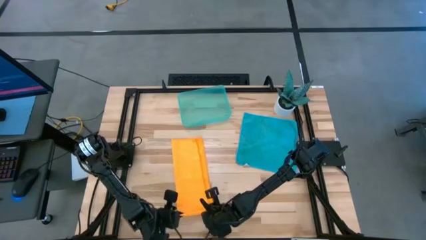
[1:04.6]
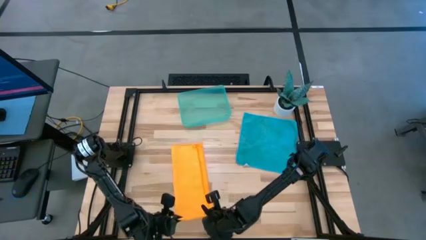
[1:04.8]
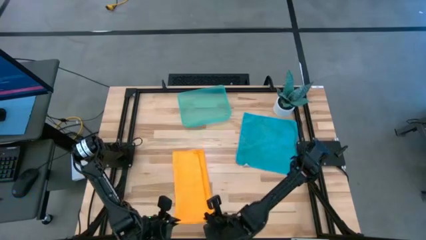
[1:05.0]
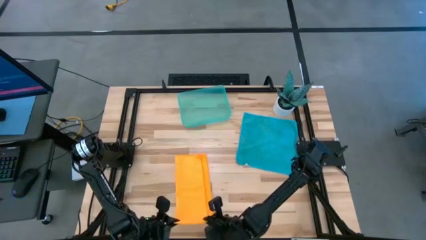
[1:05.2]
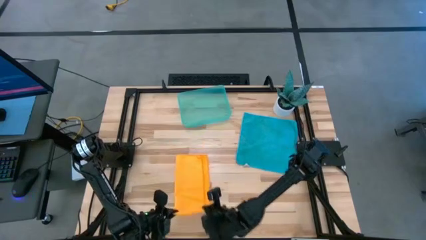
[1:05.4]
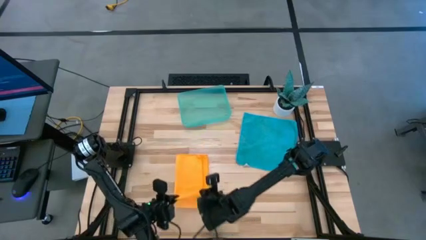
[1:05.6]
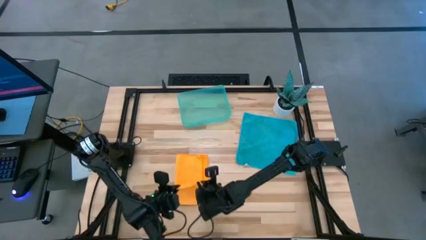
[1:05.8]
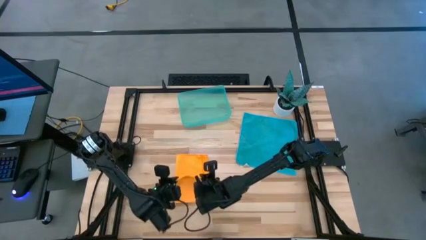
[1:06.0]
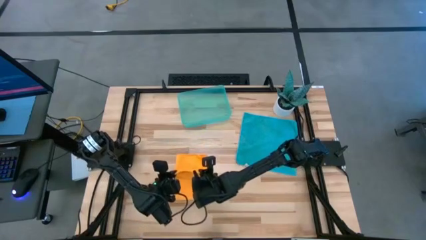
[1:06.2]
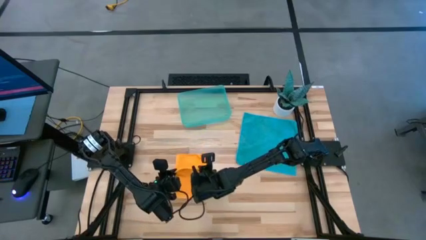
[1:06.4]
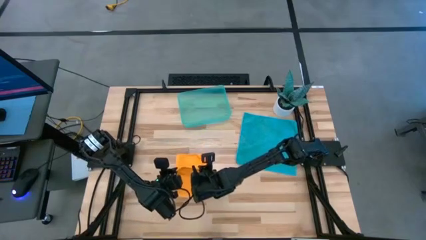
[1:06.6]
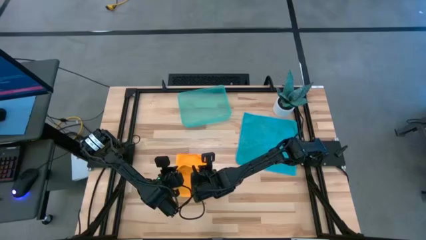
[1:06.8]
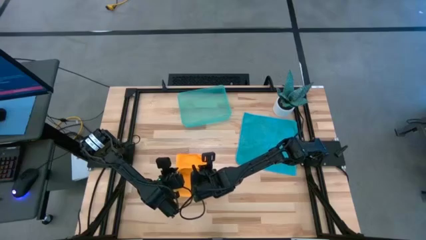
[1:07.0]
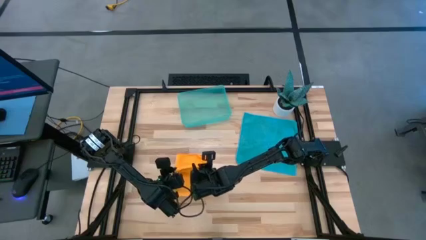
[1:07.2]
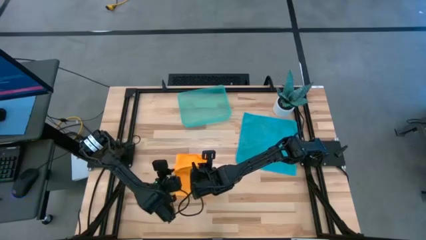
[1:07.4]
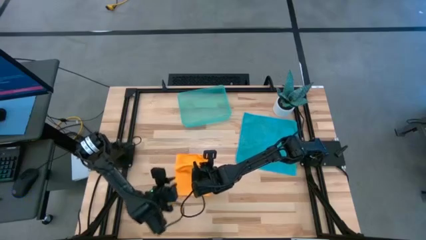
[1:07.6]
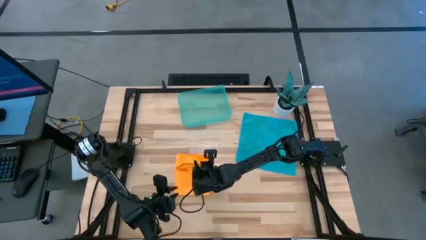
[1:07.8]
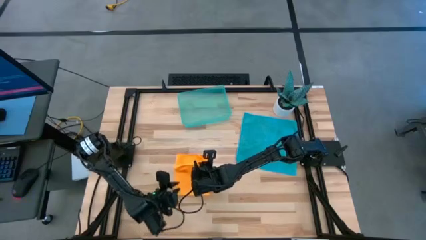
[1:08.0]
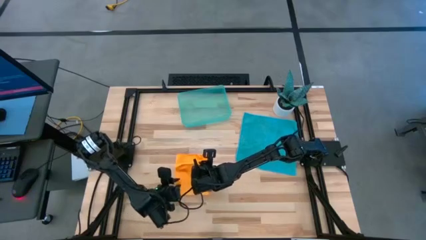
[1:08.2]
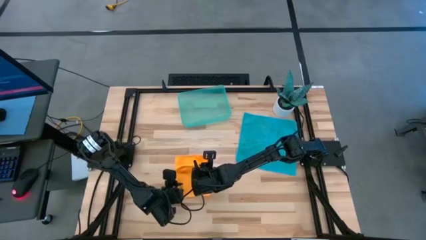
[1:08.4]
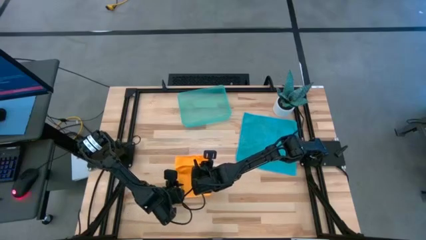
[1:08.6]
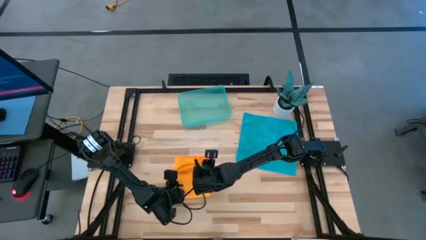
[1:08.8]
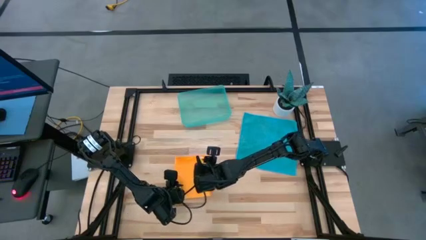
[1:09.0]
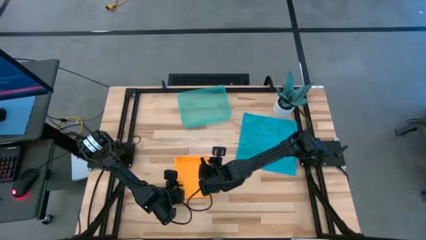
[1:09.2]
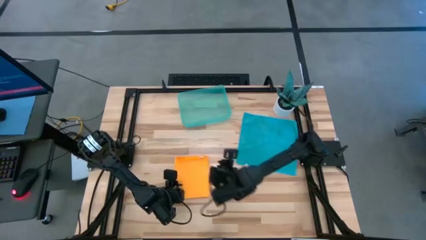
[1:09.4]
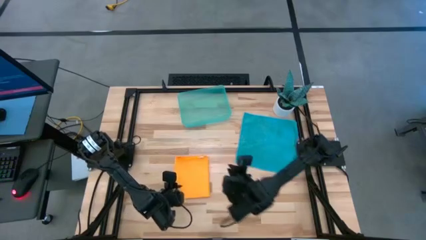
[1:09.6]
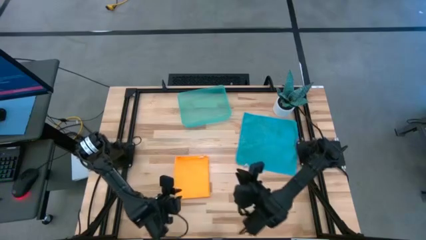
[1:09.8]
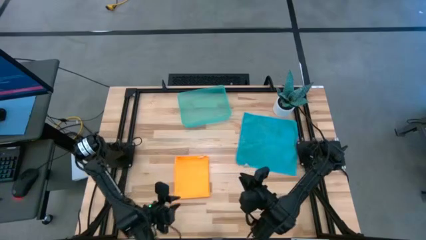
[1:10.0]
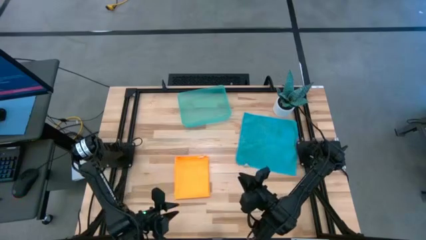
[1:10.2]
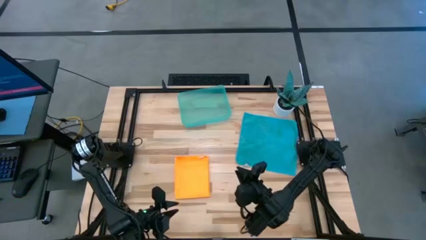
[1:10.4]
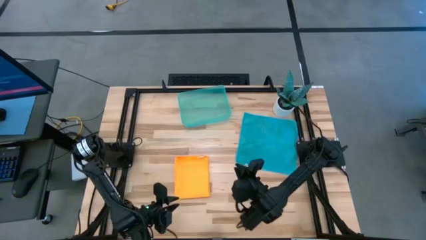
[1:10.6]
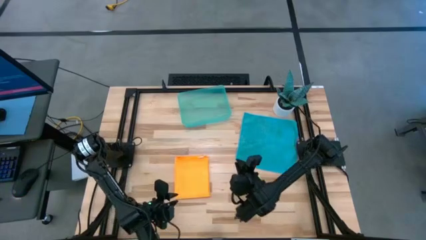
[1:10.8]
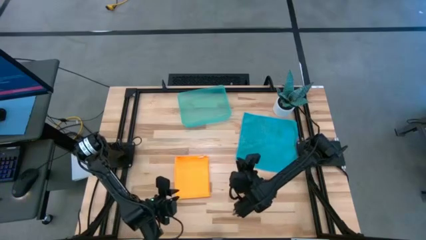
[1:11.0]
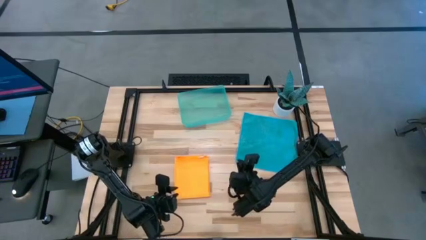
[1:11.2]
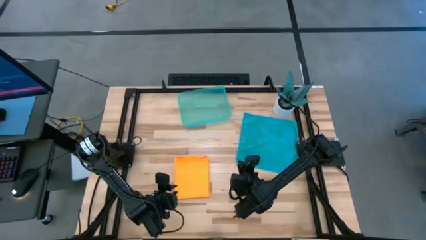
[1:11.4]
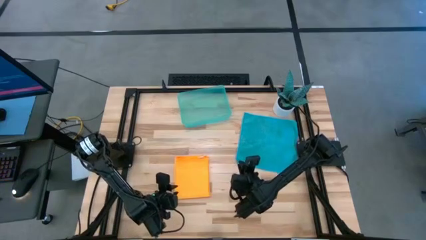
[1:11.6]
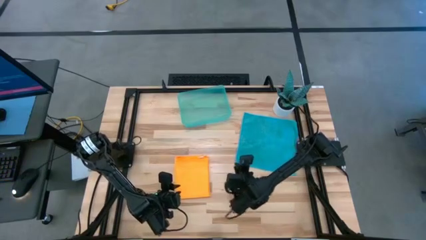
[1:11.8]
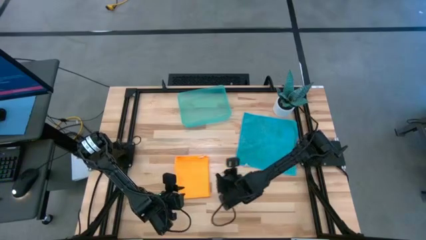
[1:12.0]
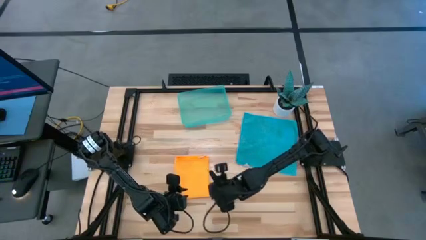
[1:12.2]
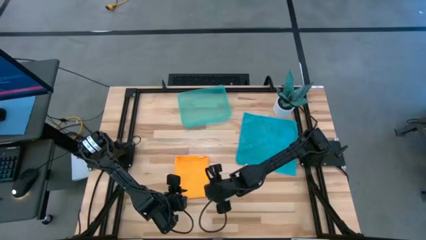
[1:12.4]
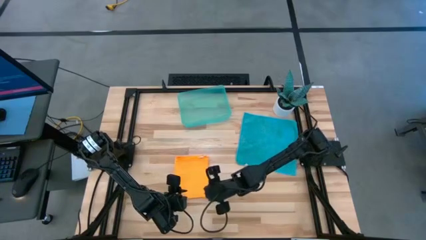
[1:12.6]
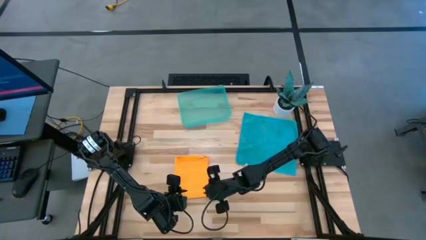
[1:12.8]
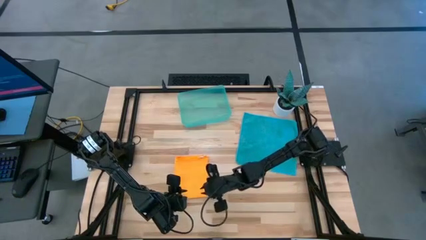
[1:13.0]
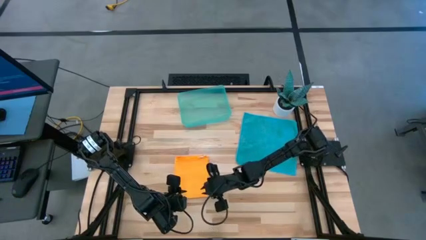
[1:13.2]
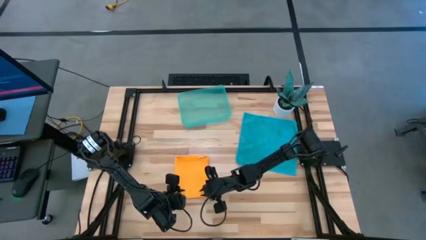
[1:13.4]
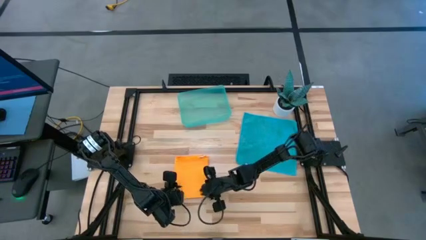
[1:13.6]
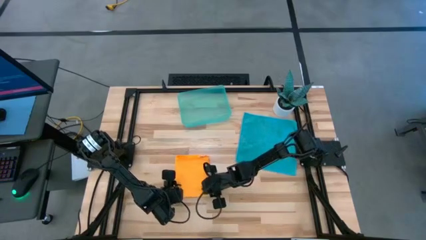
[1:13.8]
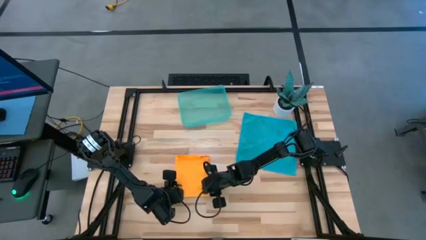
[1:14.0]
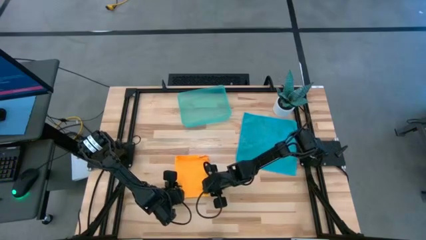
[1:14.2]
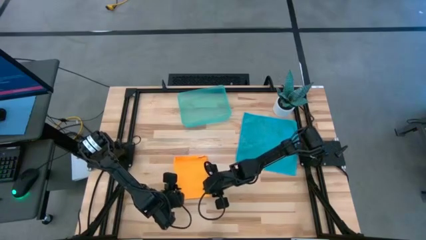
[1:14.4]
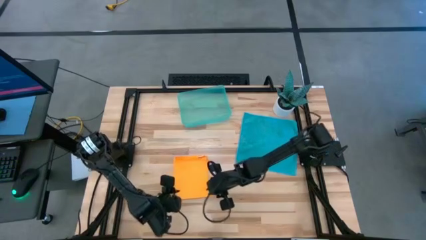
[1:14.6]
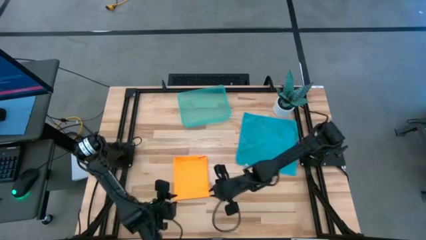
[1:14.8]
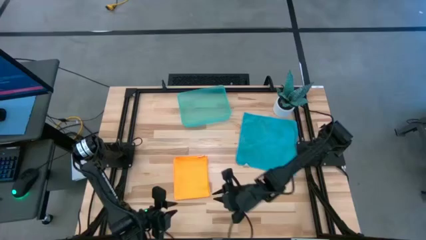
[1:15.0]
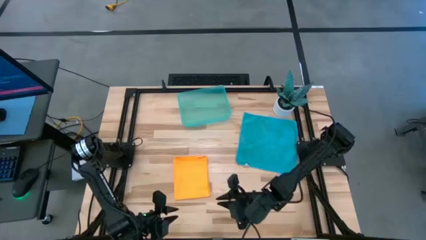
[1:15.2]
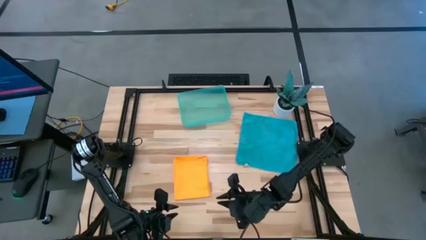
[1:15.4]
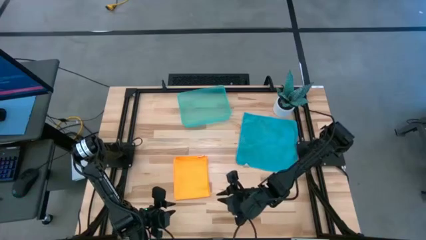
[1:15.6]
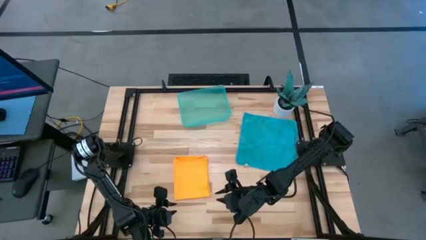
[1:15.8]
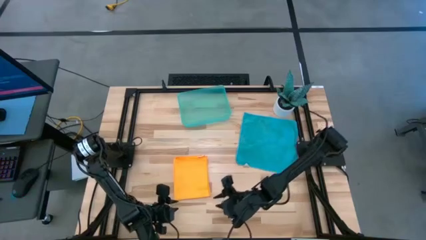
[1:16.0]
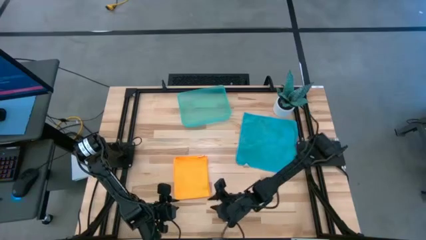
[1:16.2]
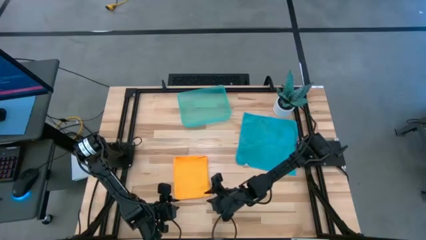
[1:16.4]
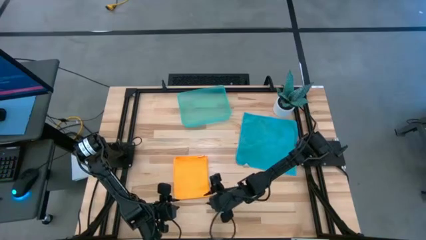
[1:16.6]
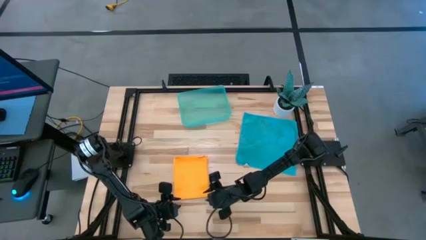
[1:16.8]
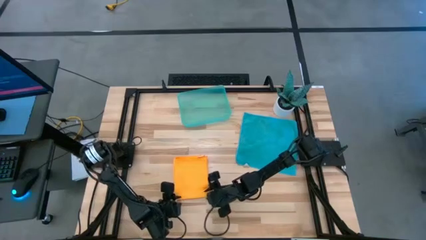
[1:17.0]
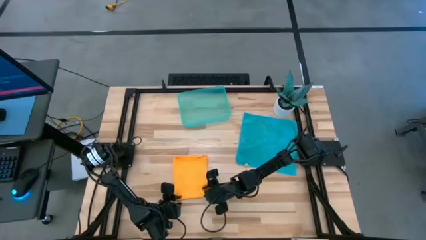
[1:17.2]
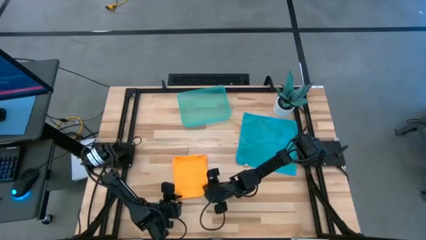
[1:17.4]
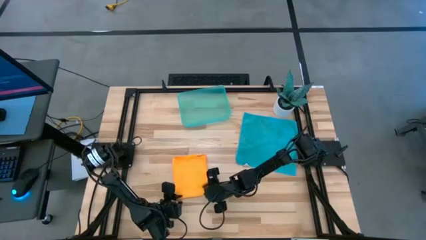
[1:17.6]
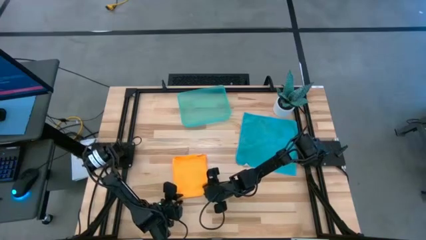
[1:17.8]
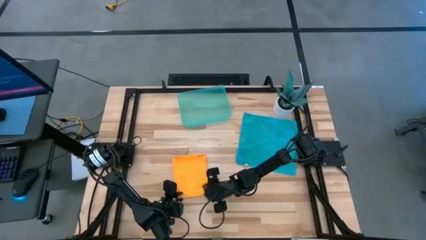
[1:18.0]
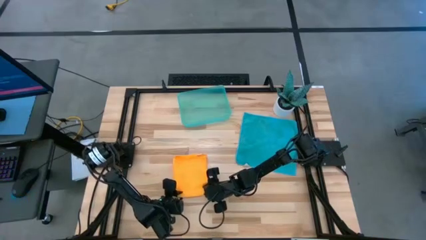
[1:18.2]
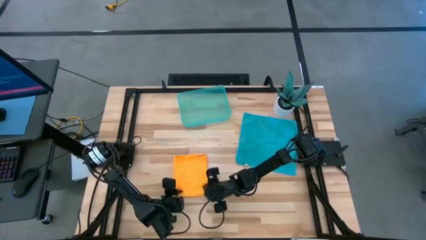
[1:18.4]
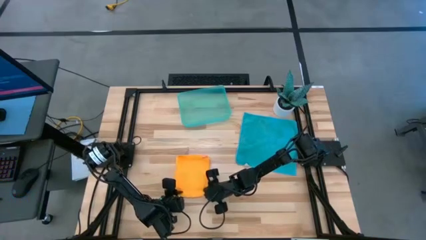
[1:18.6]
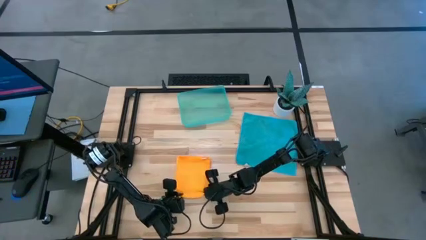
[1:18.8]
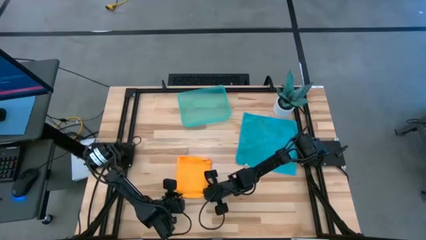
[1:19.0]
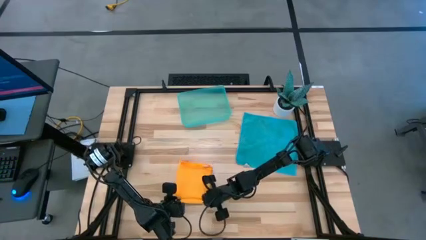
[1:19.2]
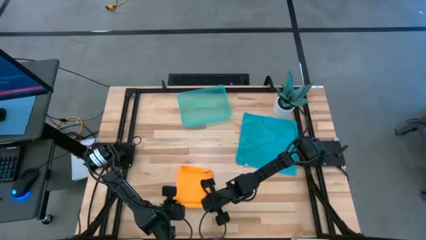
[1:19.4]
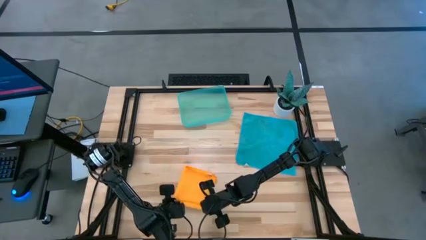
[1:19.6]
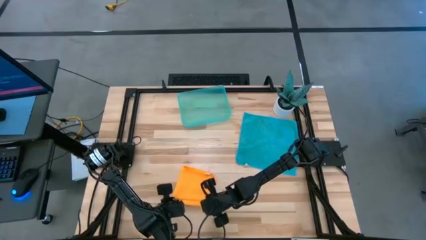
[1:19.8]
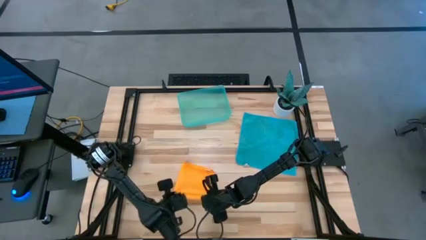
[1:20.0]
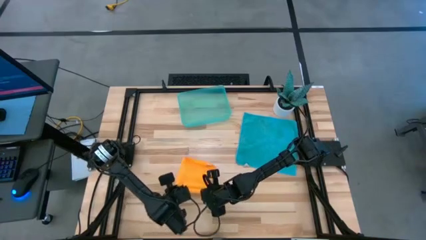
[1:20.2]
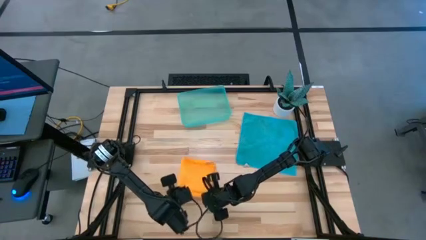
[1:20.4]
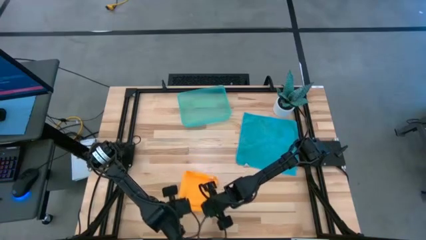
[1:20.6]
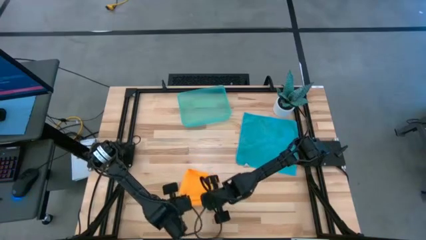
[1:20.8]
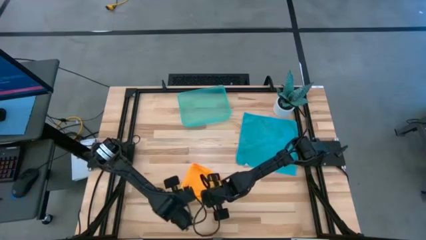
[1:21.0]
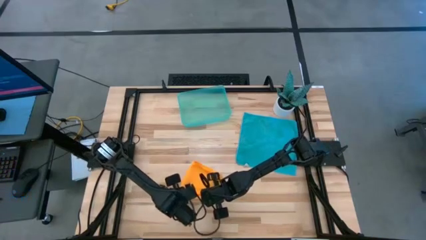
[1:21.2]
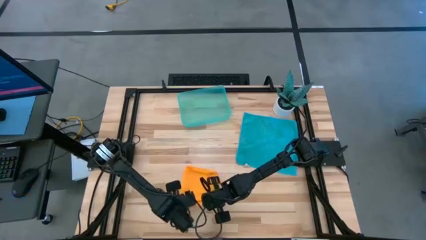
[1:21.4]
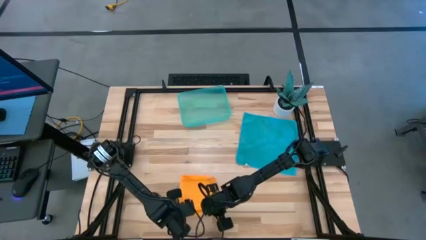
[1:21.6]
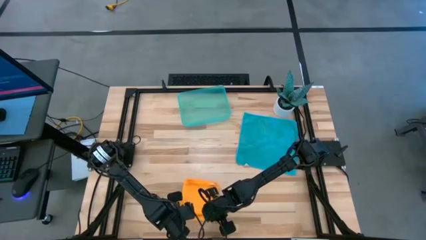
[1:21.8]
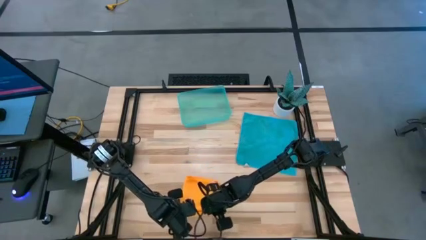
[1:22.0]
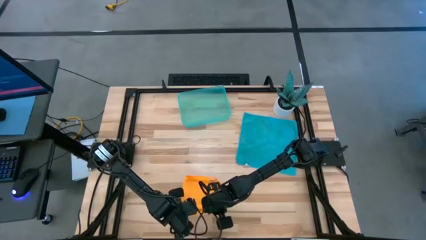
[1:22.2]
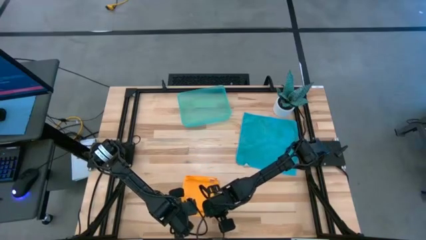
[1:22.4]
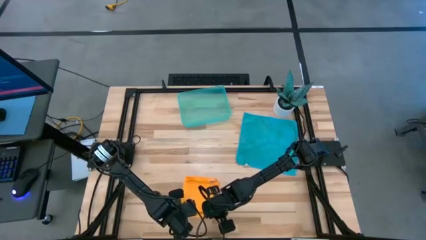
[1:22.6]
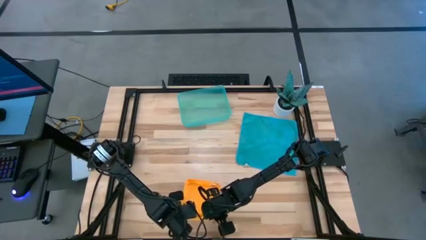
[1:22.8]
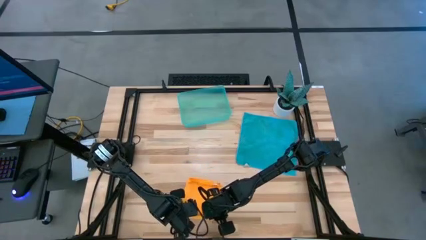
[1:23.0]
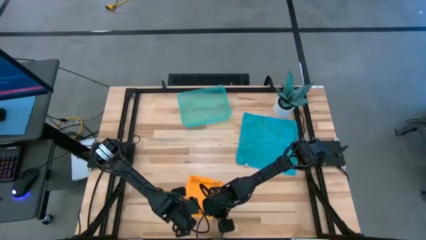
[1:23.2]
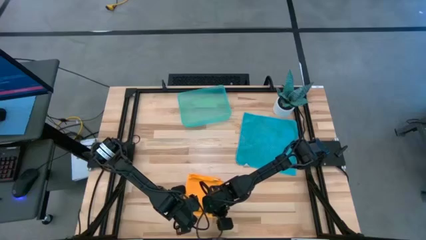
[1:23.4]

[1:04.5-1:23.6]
Task: Roll microfiber towels into tight, uniform cylinder then place into a basket
Roll the yellow microfiber towel
